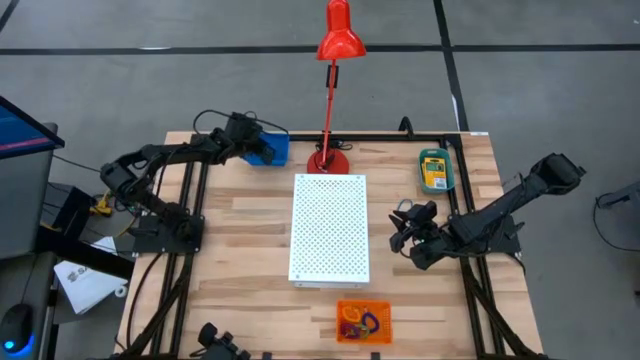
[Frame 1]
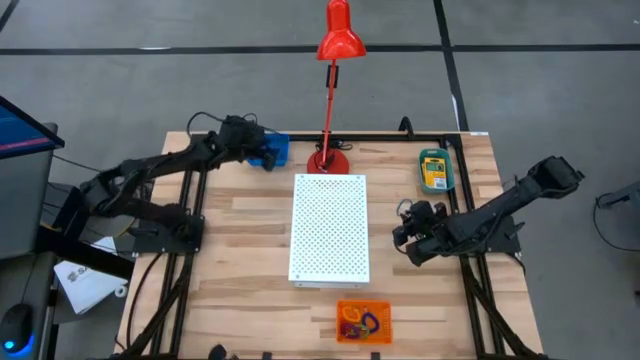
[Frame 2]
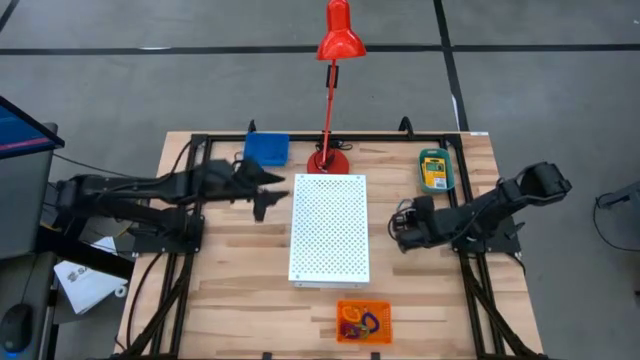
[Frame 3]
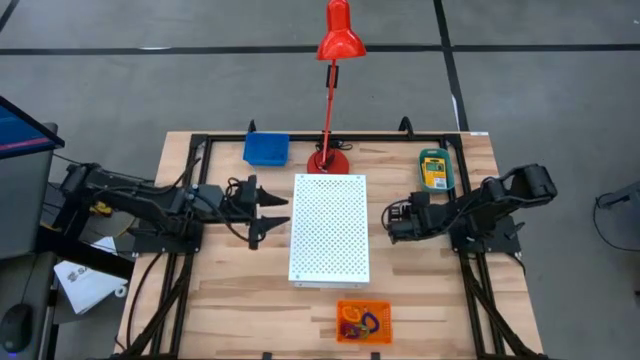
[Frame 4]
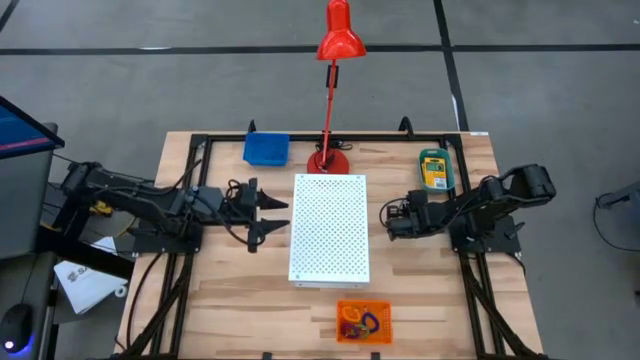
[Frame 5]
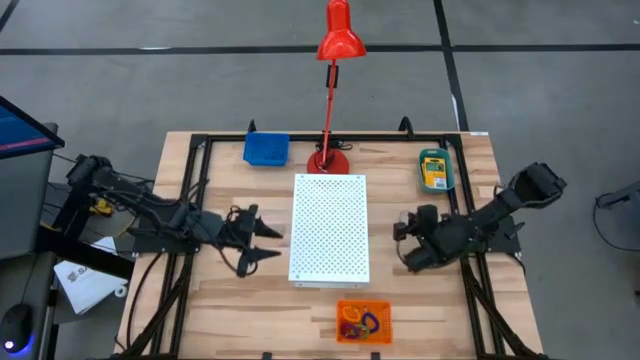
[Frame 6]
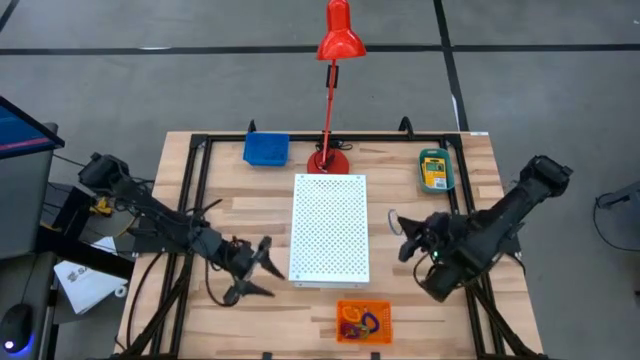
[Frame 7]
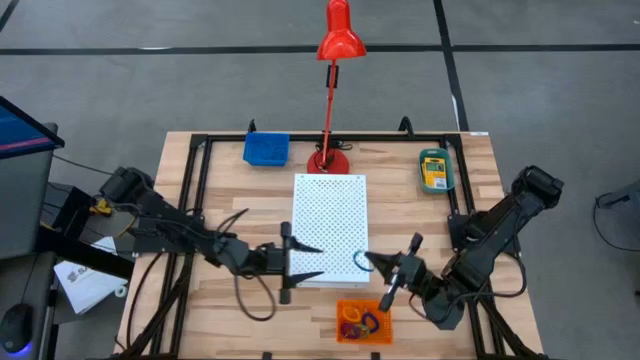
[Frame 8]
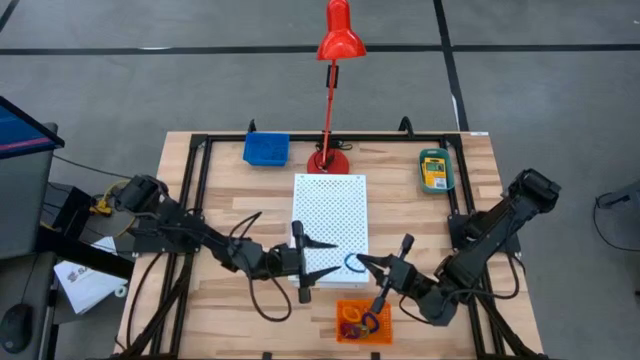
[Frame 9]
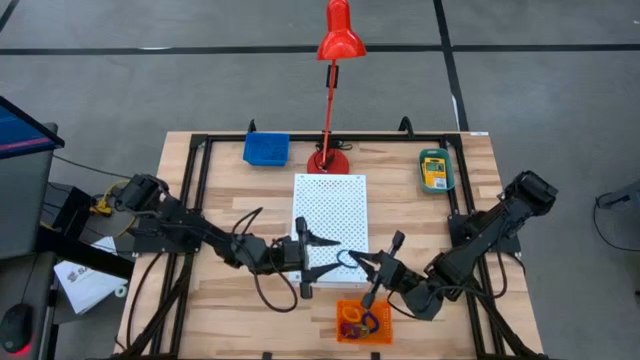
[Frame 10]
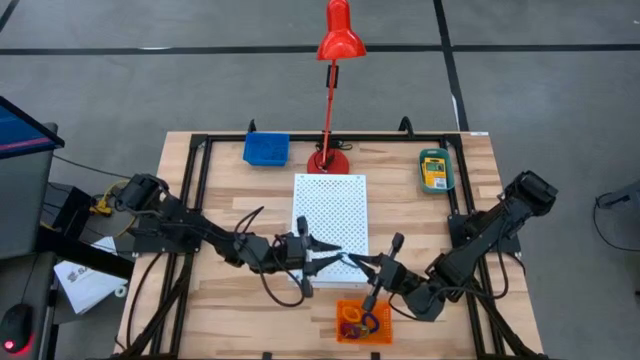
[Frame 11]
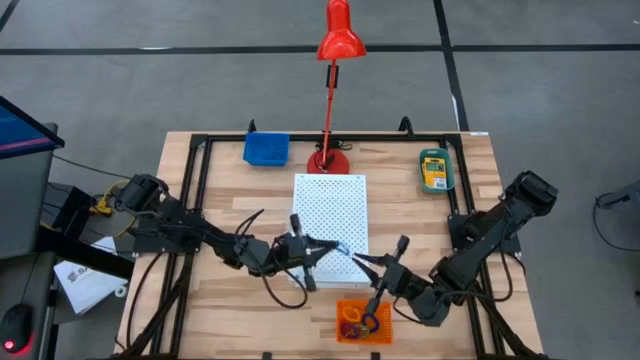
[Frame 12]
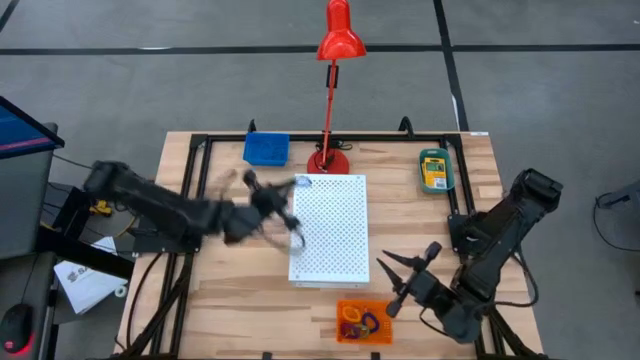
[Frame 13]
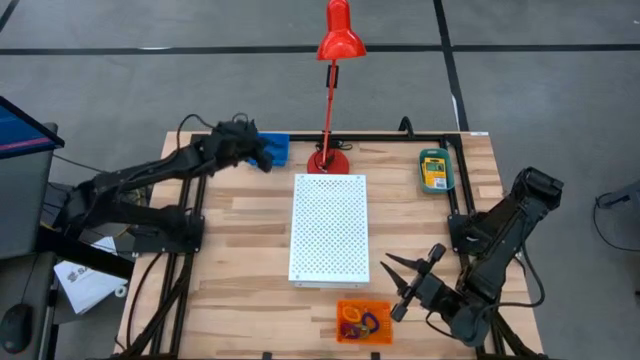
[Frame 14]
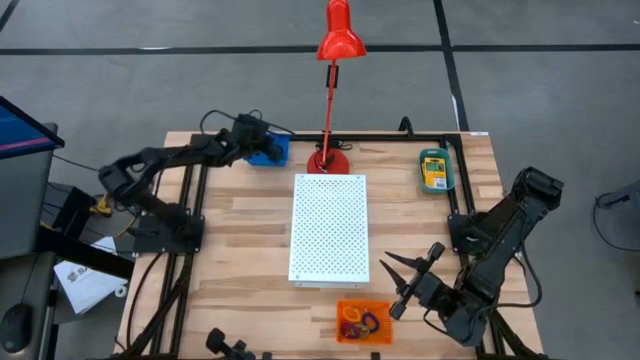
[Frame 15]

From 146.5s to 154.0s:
Task: Pick & Place Office Desk Supplies
Put the blue rubber band into the blue bin

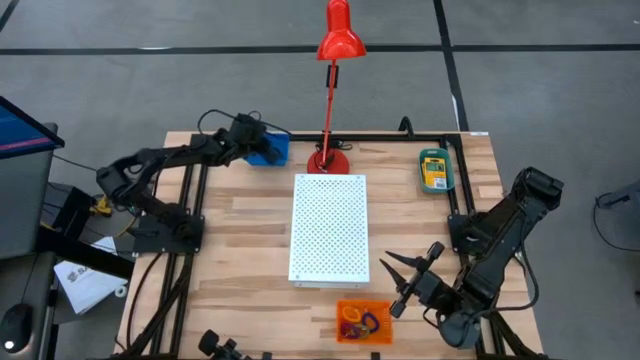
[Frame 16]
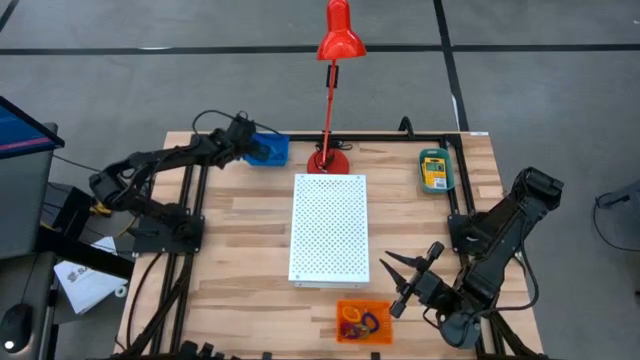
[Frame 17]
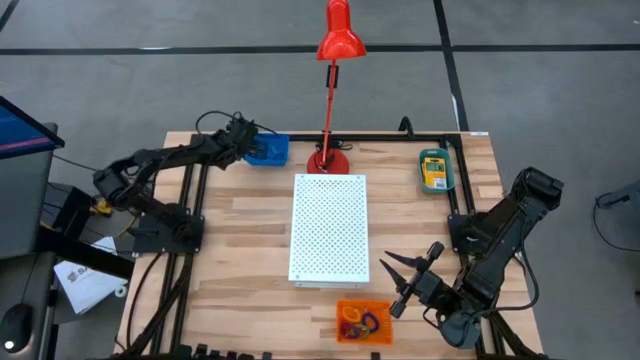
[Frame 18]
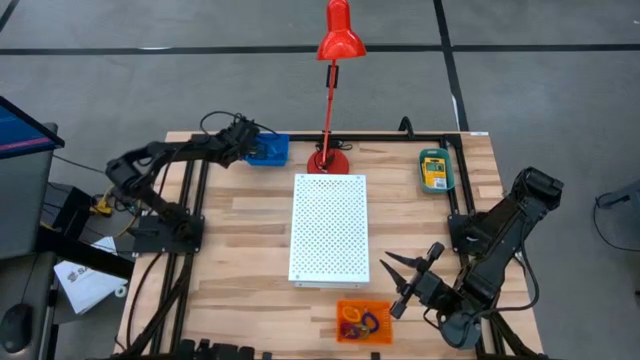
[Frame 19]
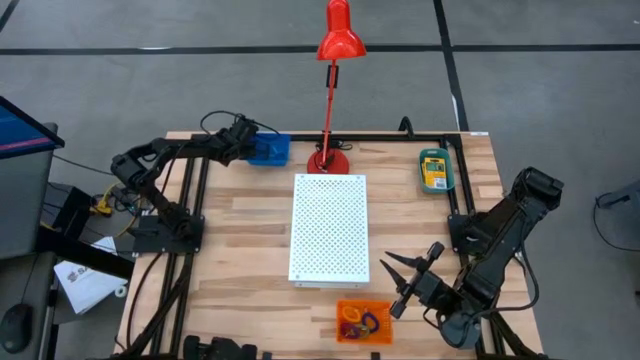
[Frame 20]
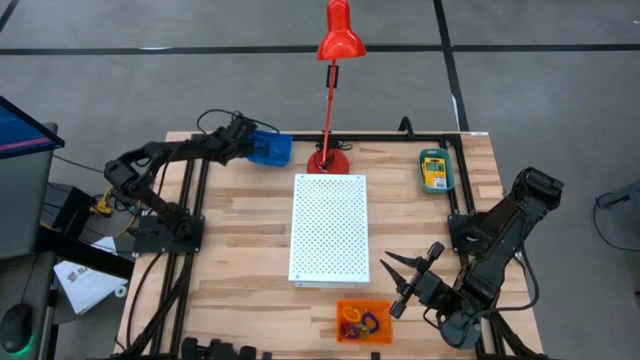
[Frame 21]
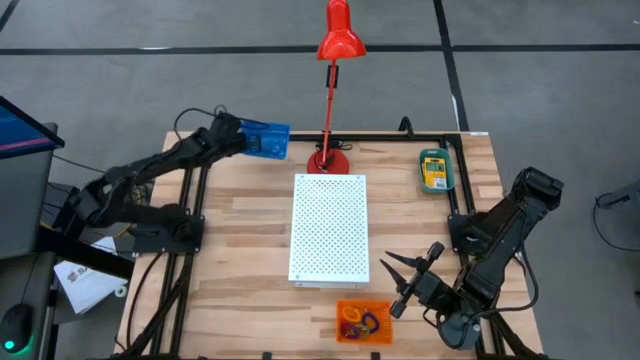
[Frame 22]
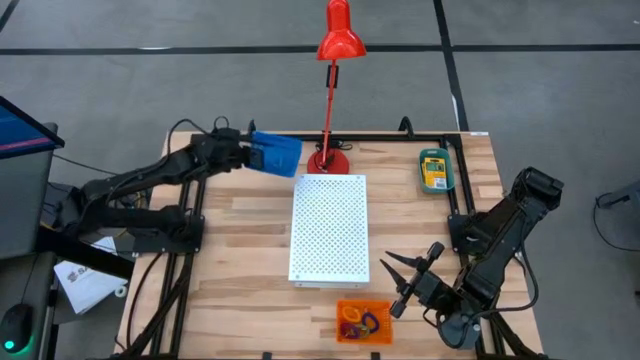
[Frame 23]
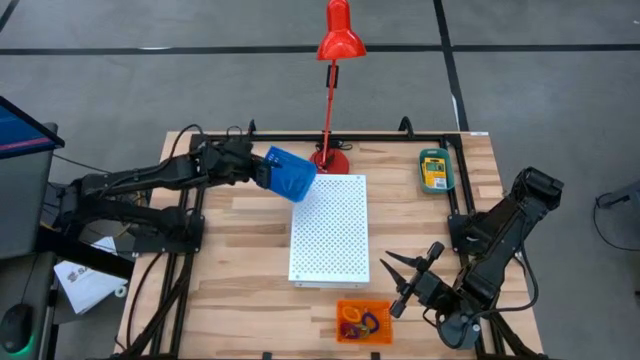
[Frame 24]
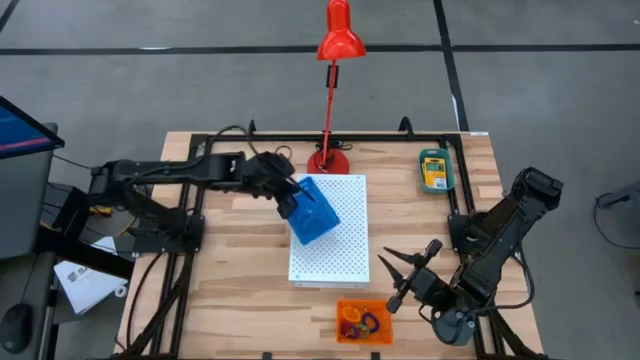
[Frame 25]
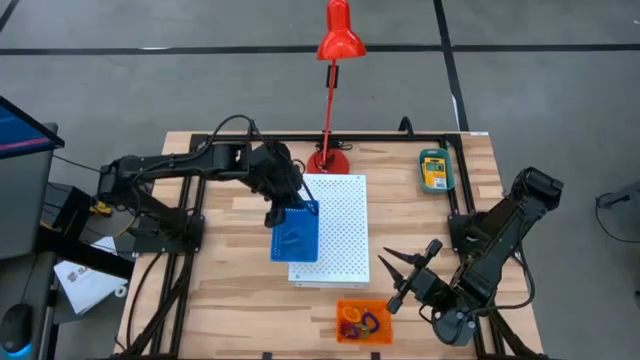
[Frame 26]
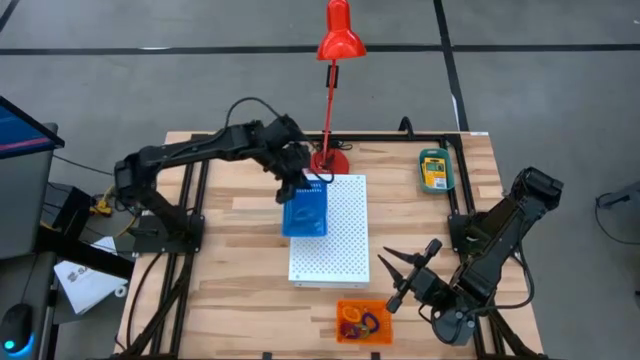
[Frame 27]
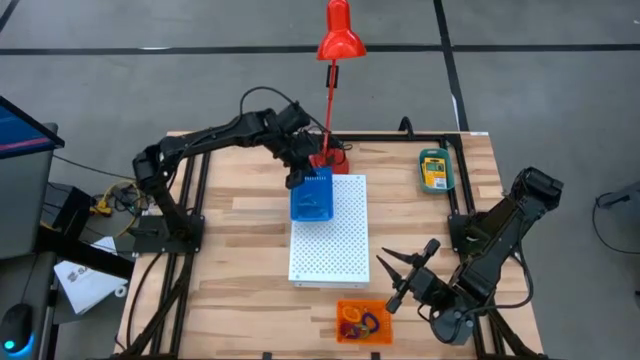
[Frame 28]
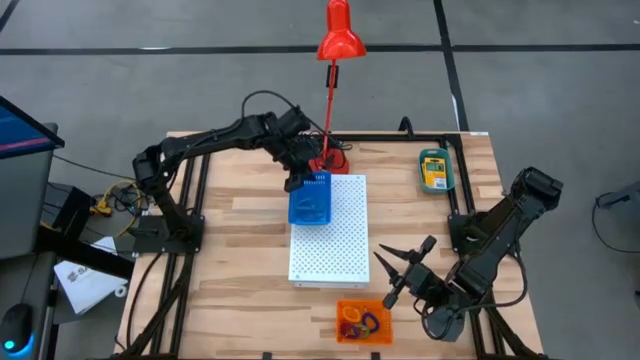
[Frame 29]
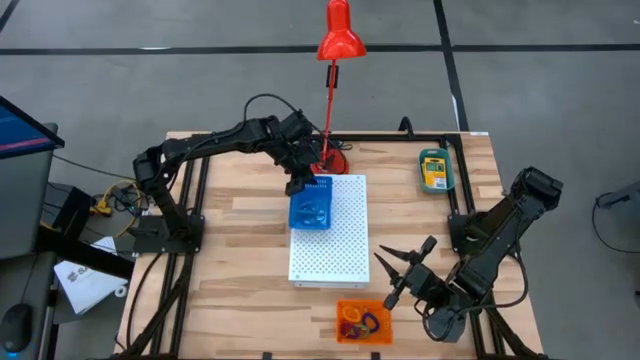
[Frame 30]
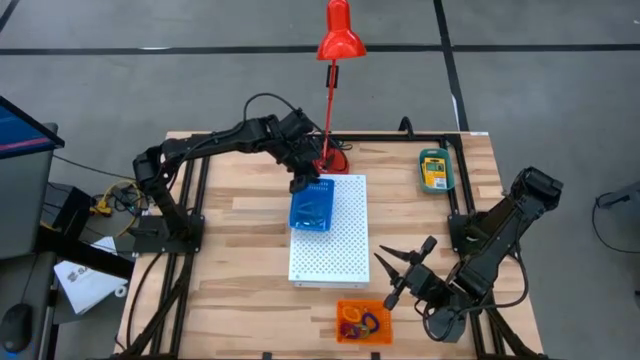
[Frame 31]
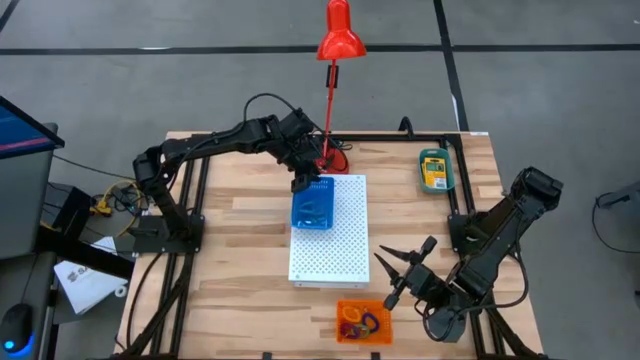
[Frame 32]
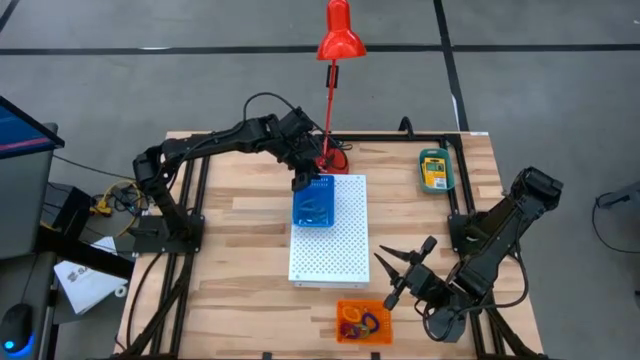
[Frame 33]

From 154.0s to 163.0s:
Put the blue bin on the shelf

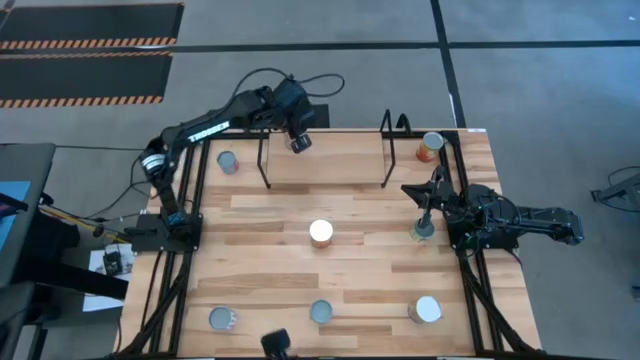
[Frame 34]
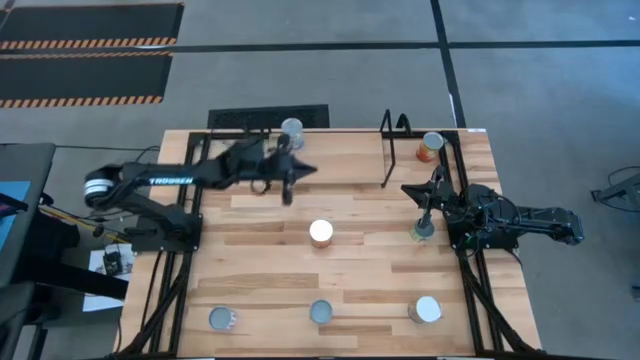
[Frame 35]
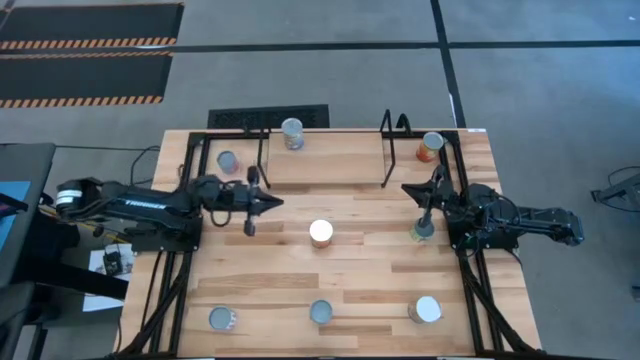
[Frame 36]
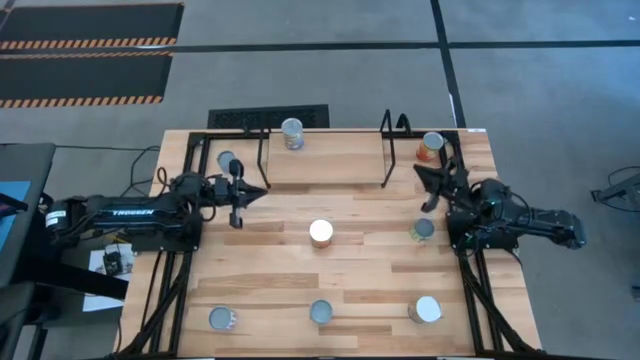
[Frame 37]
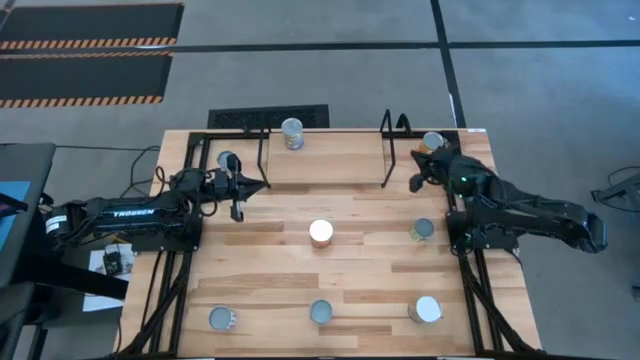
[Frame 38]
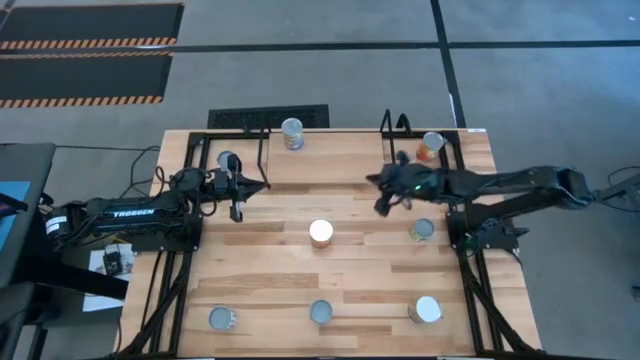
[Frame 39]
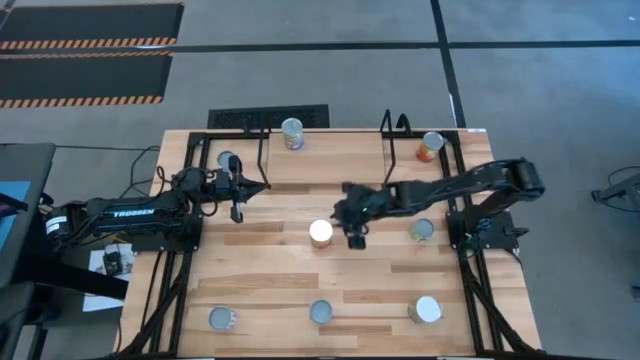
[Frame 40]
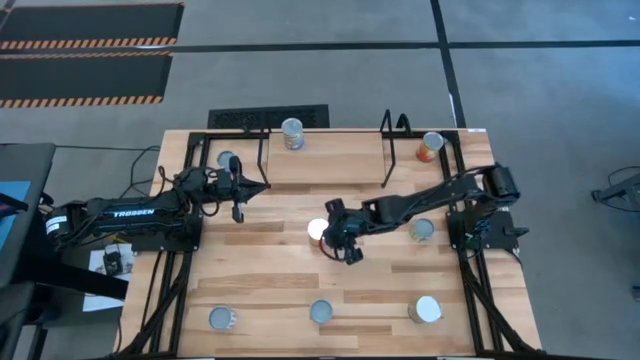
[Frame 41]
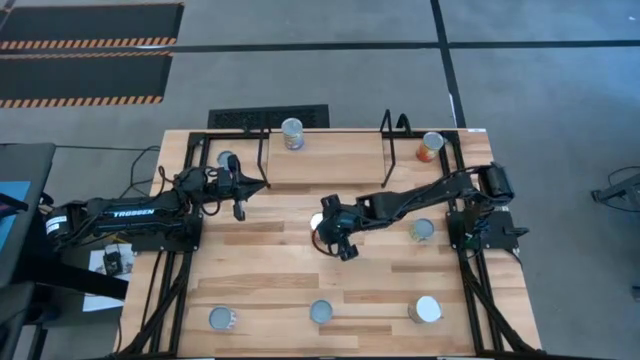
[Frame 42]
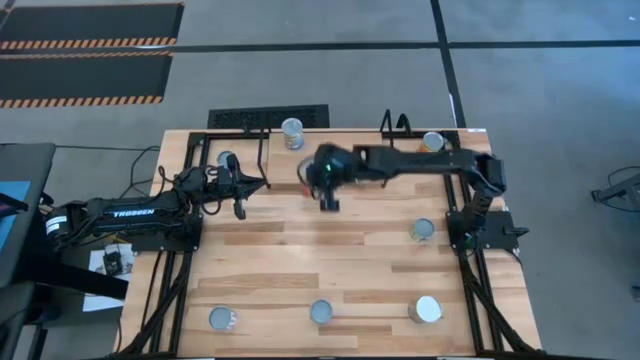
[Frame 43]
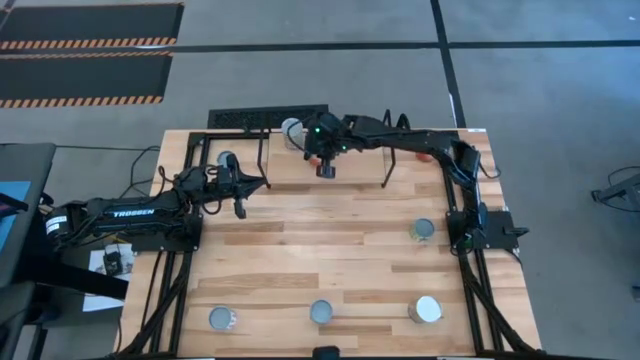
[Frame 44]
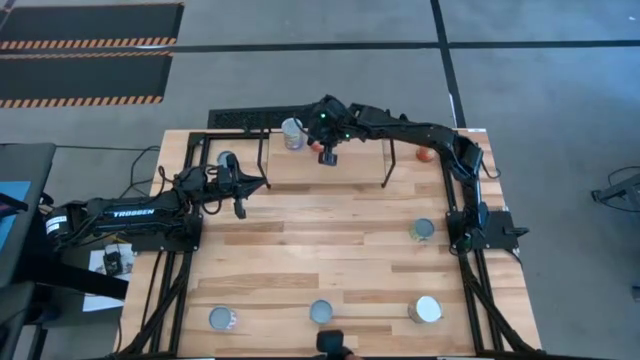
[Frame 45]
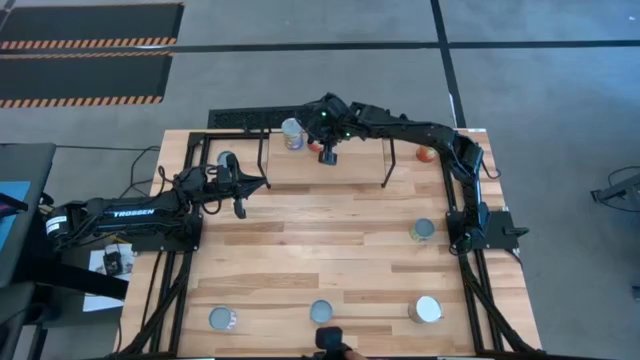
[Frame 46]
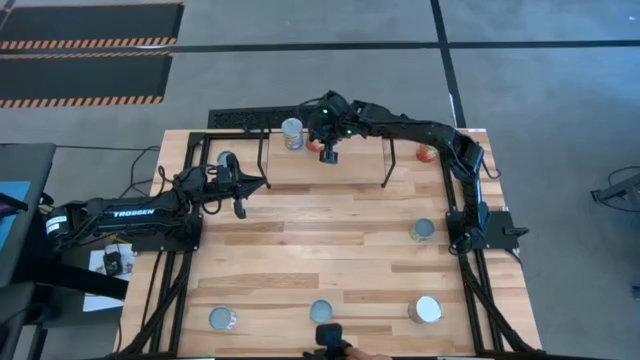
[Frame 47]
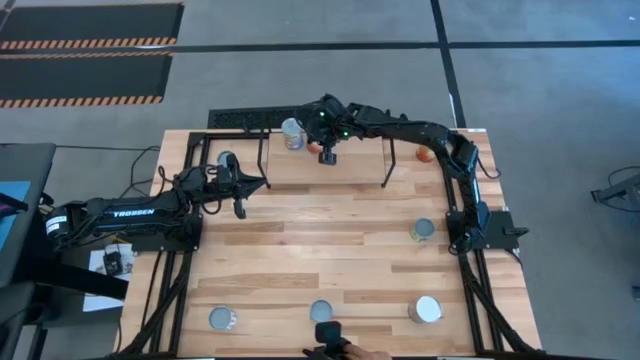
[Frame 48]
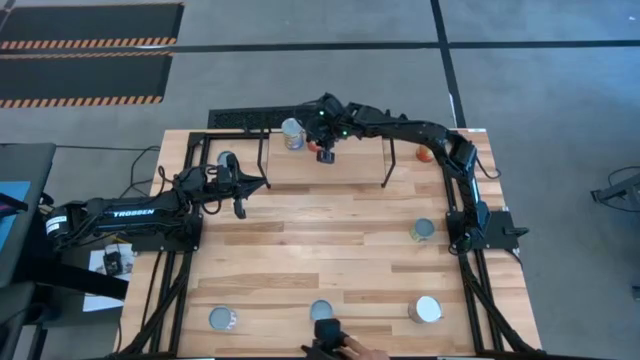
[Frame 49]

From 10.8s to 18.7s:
Task: Pick and place cans onto a shelf
Put the left canned corn on the shelf
